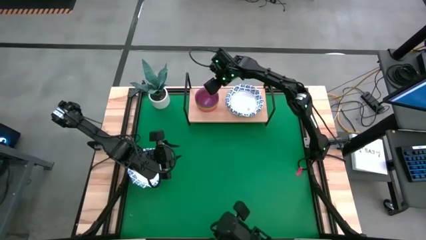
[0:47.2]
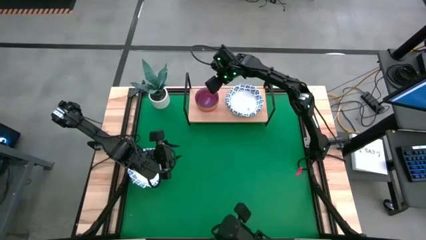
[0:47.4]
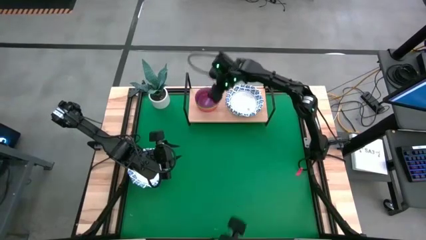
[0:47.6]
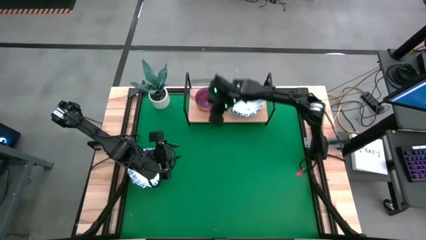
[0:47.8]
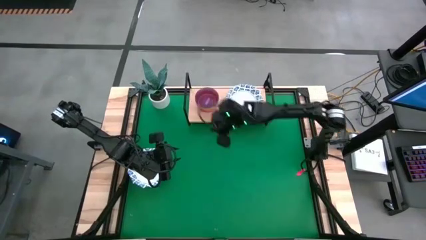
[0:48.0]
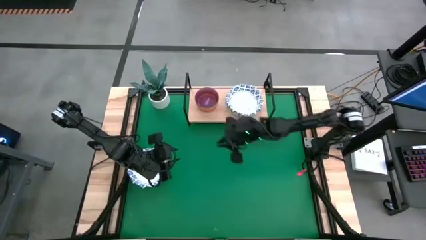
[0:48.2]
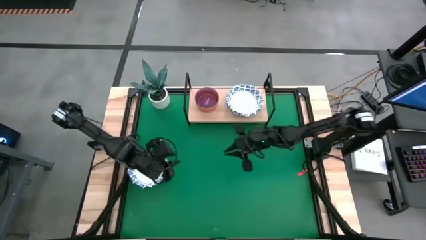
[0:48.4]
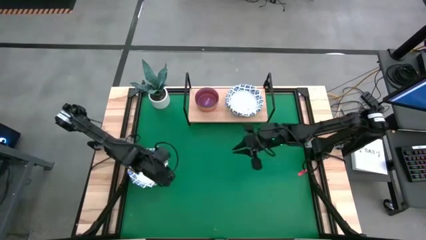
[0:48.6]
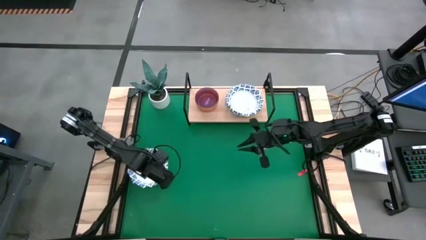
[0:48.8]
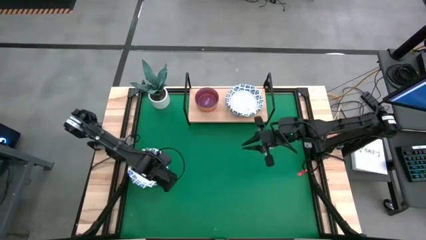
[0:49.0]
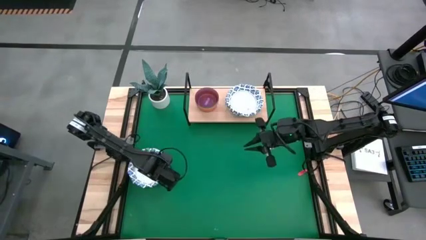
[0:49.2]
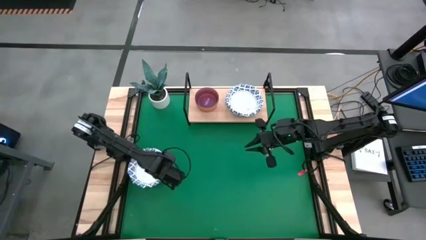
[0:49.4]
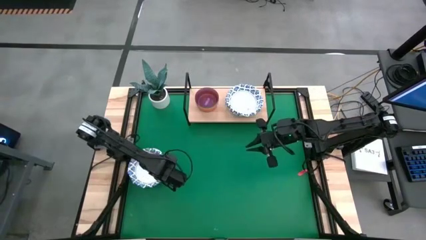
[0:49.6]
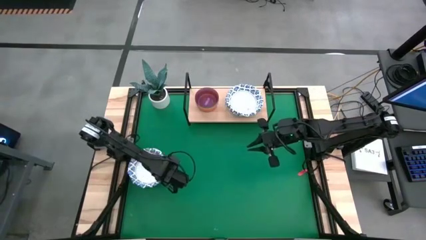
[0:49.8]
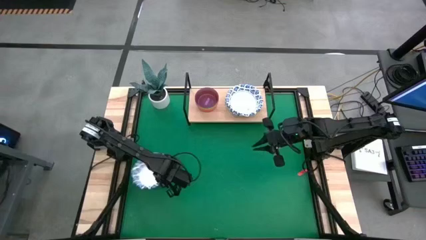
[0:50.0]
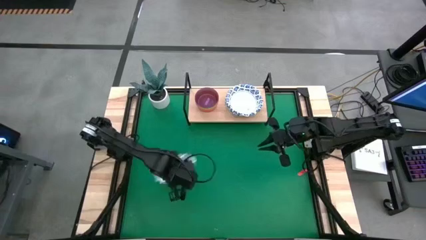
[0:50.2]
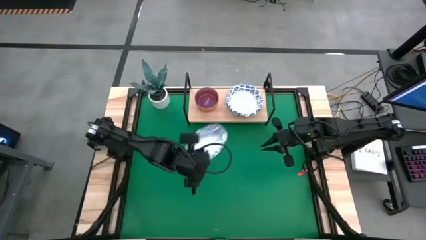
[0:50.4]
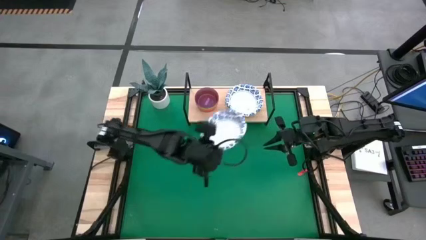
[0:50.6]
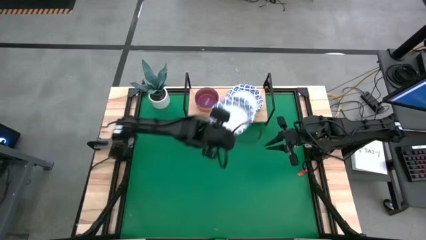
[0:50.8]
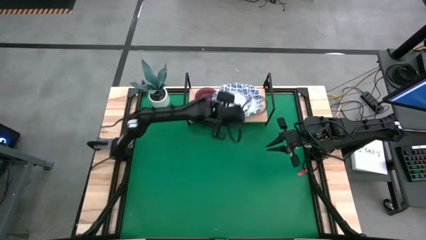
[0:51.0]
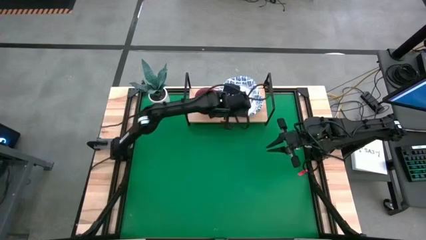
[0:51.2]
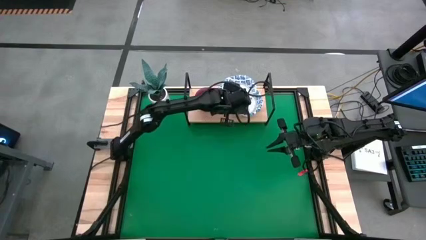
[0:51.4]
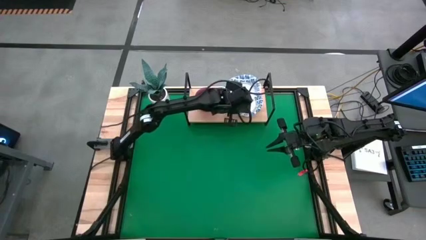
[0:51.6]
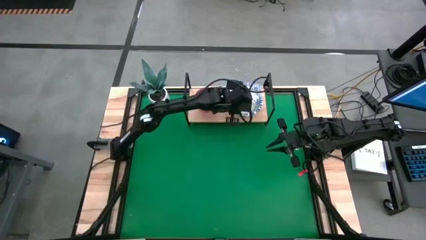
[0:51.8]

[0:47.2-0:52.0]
Task: Place and stack bowls onto a shelf
Stack the white patterned bowl on top of the white patterned bowl on the shelf

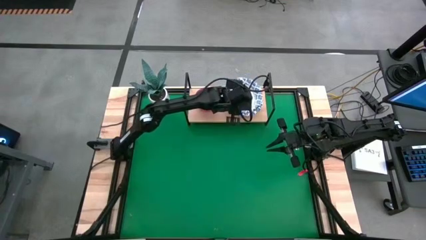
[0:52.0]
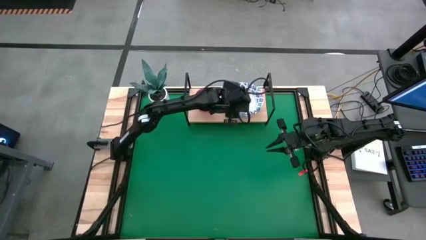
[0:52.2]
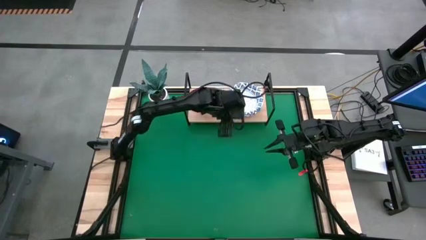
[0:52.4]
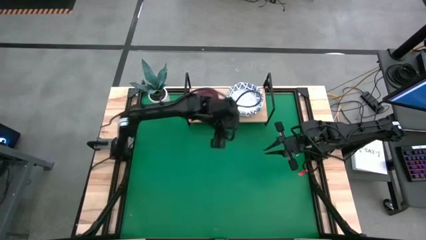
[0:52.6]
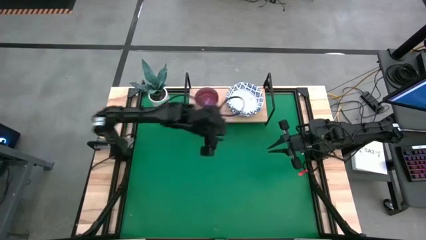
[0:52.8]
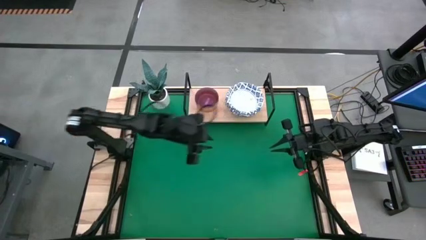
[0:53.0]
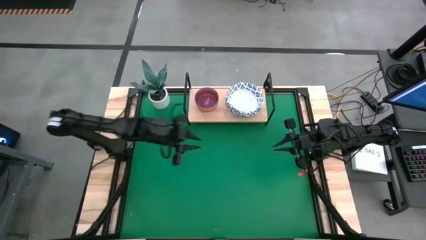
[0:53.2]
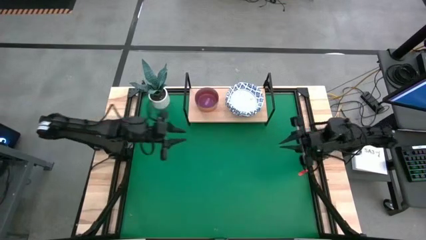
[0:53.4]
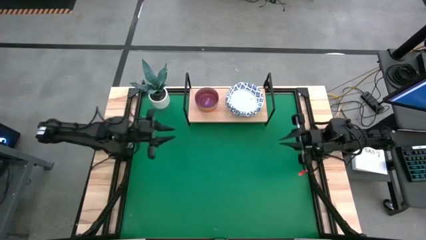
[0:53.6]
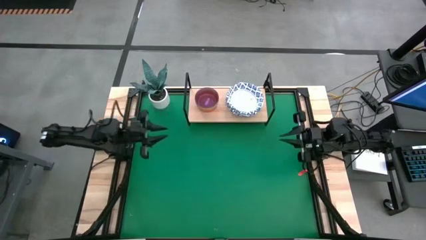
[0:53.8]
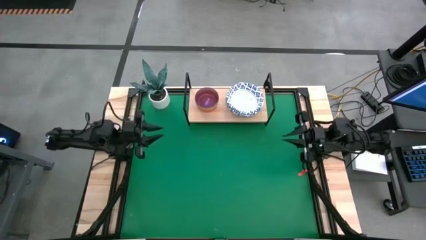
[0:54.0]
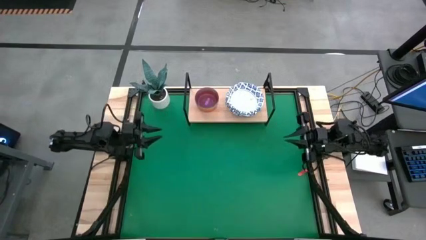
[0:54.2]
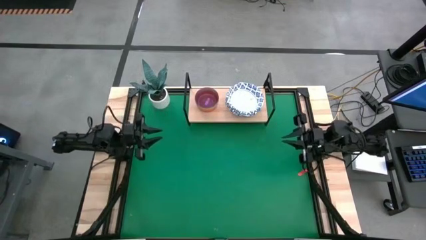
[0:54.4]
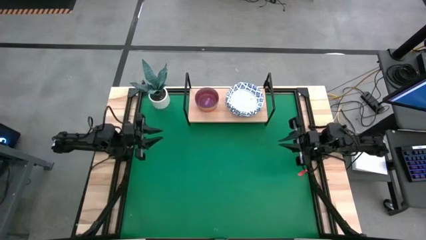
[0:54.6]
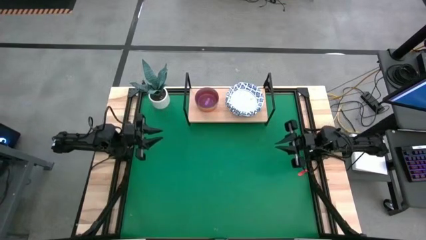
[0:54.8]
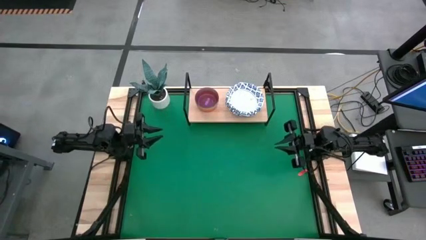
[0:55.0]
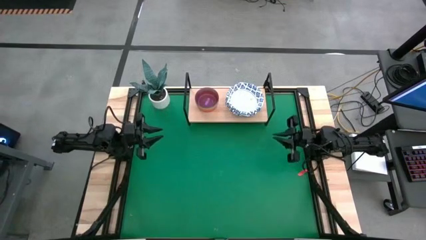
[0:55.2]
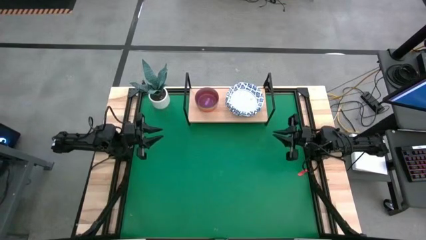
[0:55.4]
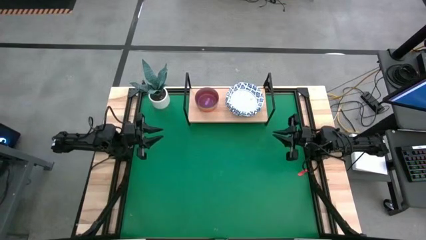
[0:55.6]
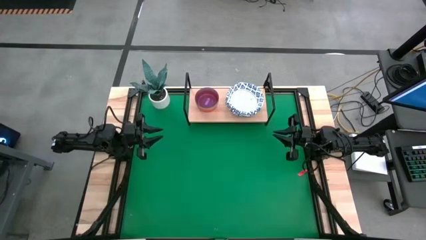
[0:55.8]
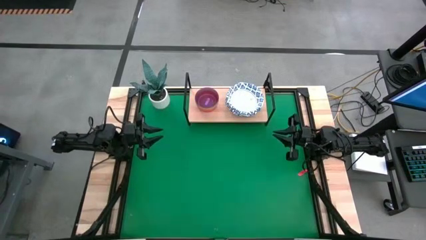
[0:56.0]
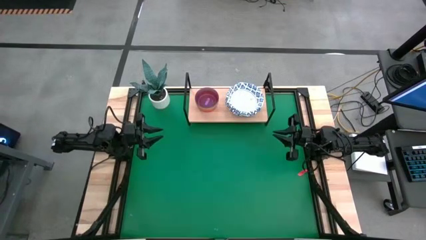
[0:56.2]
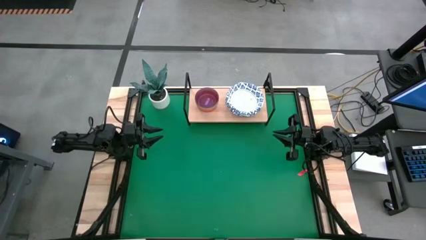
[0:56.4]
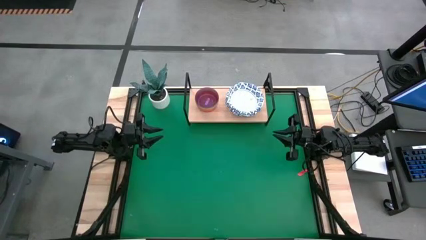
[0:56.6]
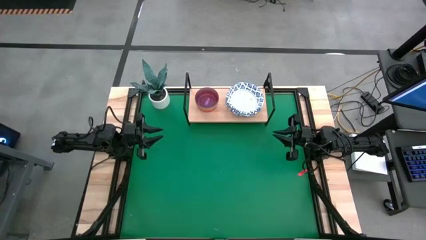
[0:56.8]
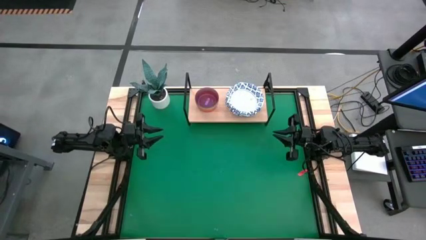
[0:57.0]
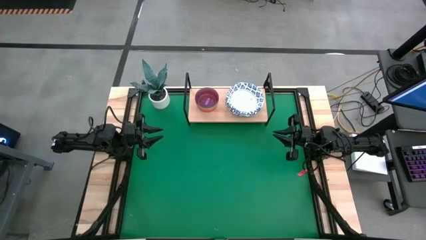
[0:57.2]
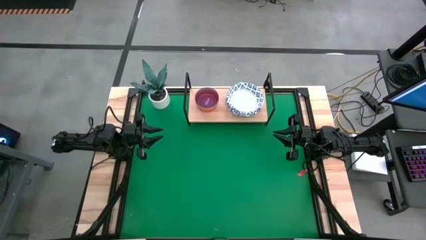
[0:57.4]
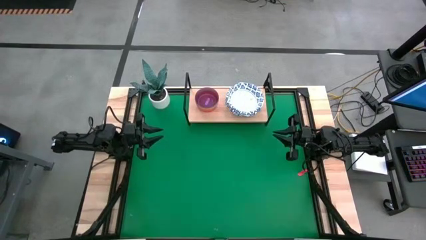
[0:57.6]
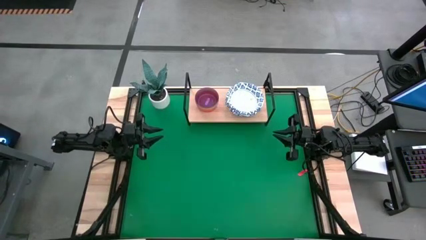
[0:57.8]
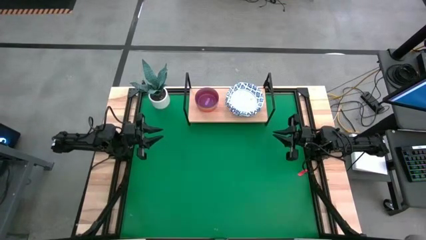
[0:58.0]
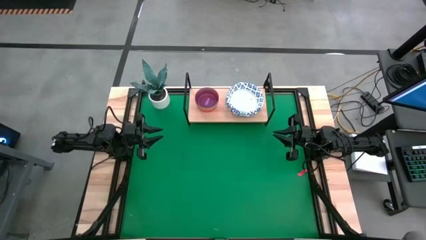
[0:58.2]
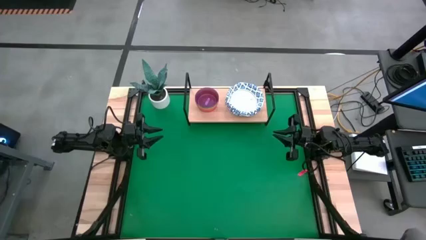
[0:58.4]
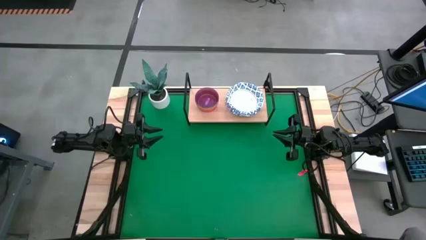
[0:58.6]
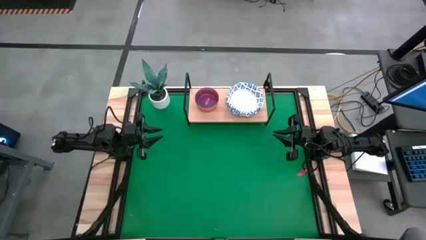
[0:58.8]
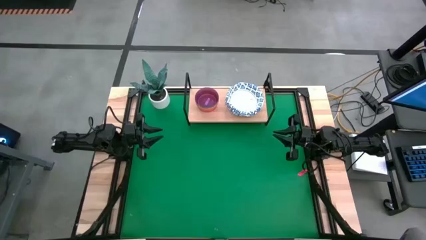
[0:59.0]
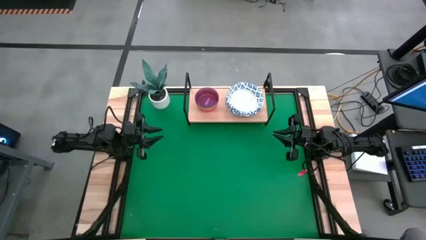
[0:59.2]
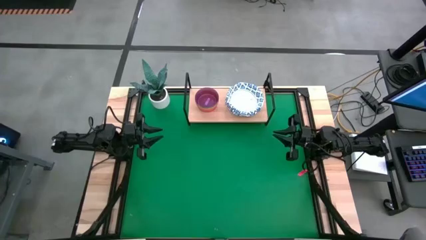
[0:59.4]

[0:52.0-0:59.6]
Return to Home Position

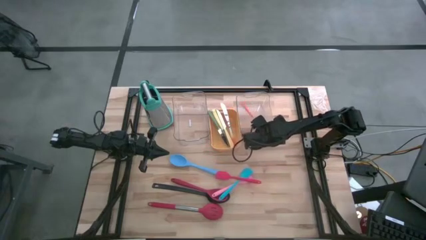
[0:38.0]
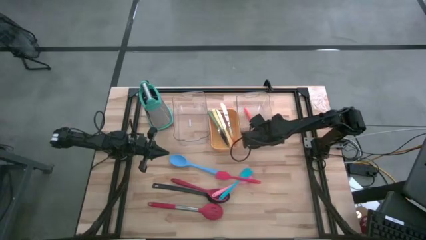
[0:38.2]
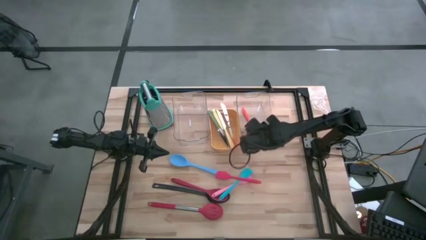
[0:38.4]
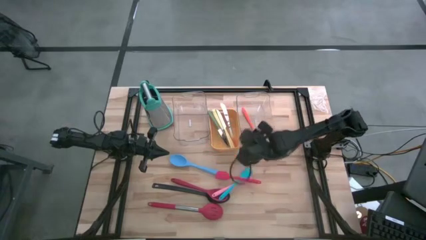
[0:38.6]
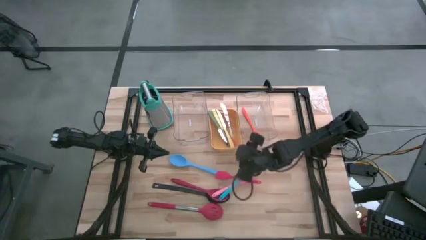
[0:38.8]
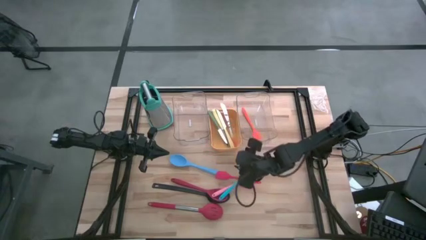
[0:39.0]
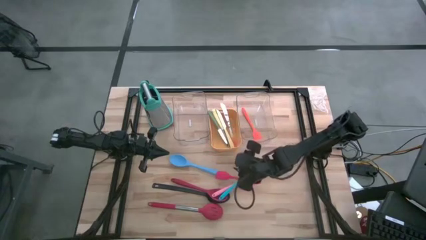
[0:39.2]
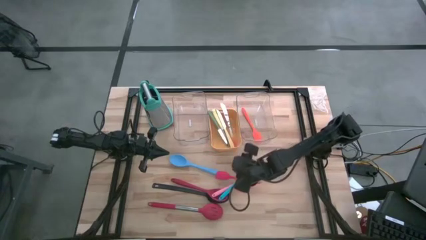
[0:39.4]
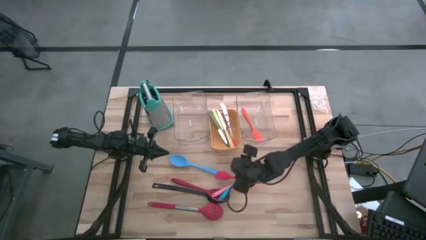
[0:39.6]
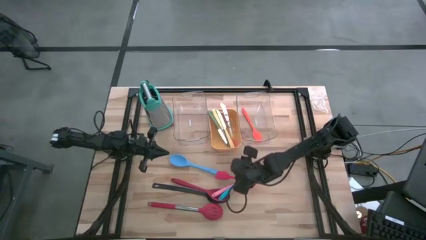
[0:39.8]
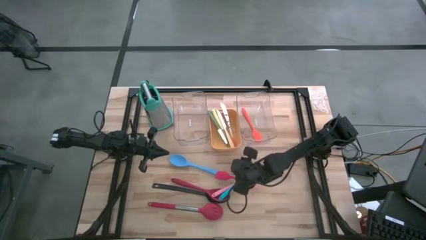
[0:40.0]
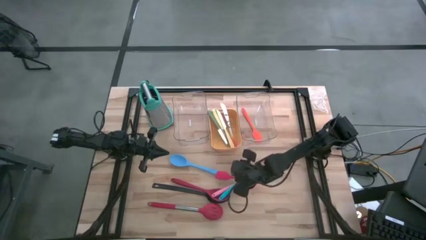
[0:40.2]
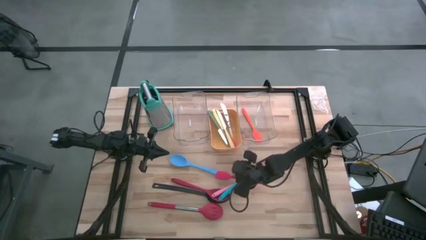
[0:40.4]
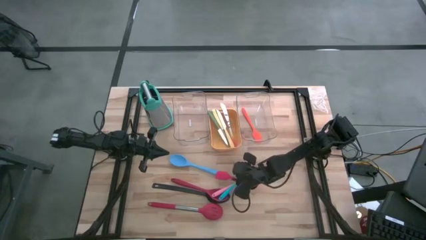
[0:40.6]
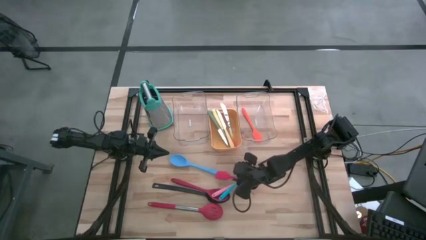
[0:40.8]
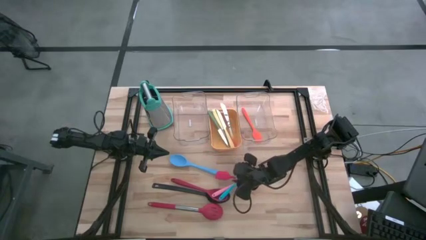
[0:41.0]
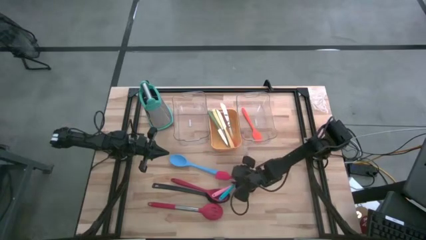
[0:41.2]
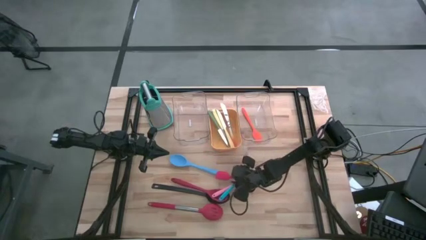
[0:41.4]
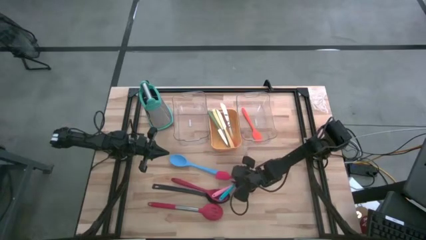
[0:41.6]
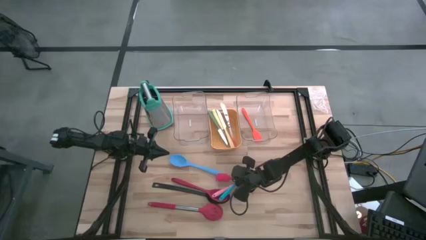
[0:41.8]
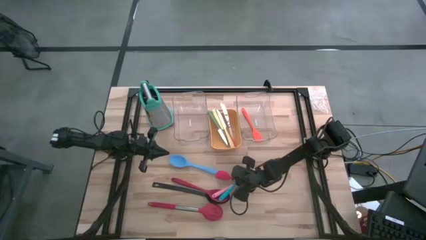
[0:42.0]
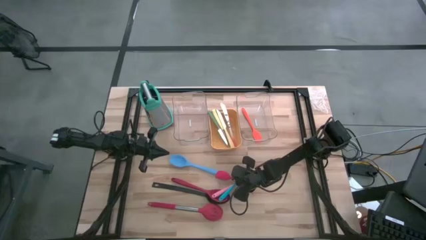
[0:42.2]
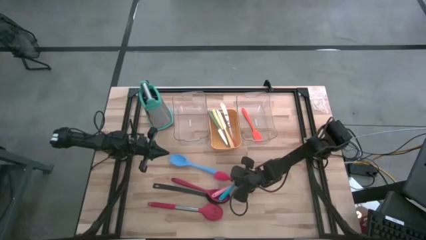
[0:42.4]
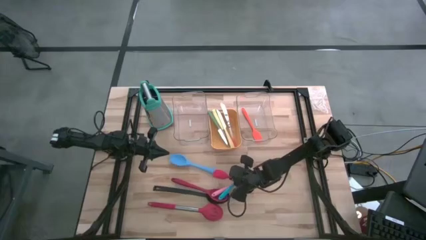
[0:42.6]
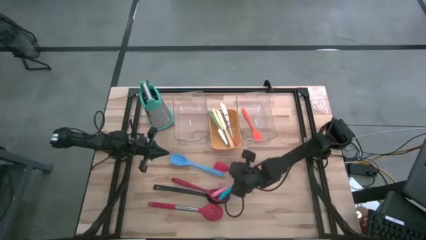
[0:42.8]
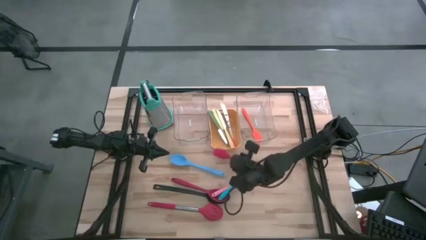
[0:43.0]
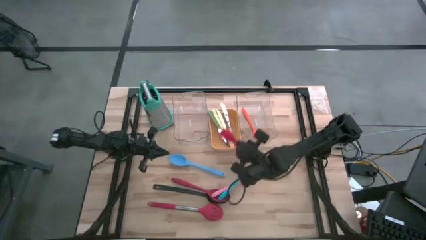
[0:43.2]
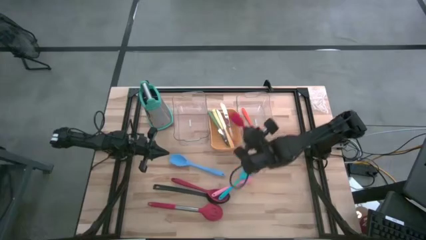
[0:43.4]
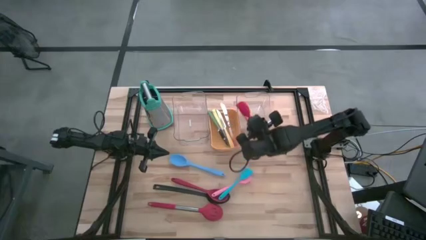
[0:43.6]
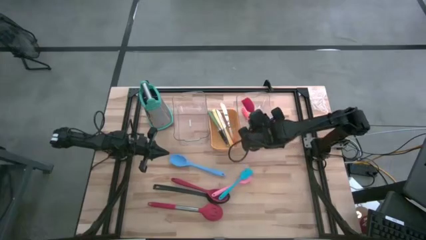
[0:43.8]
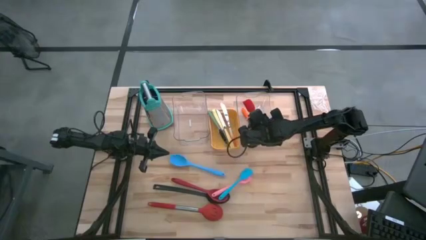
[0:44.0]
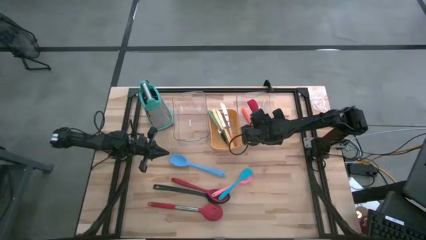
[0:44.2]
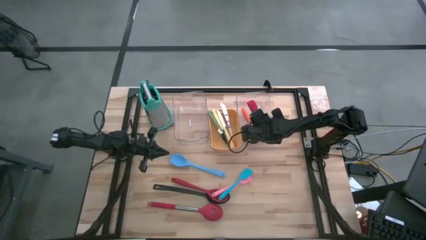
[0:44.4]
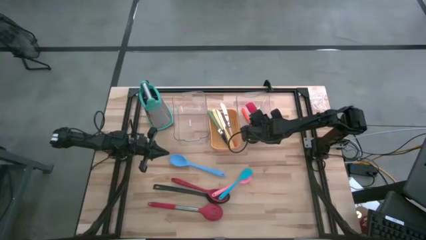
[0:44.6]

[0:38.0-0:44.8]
Task: Pick & Place Kitchen Items
Put the red spatula into the right transparent bin
